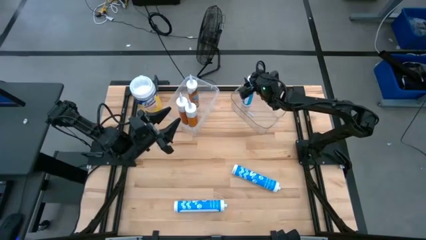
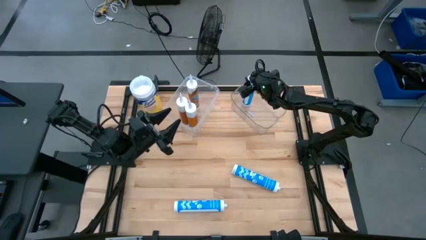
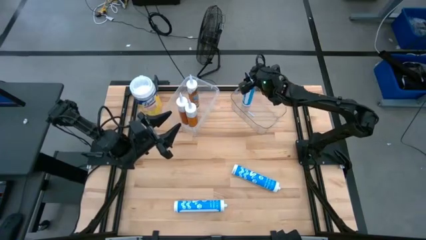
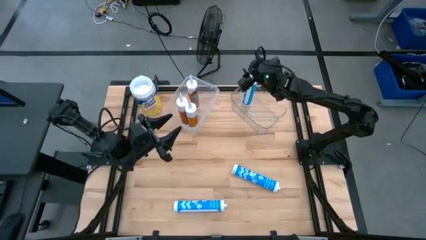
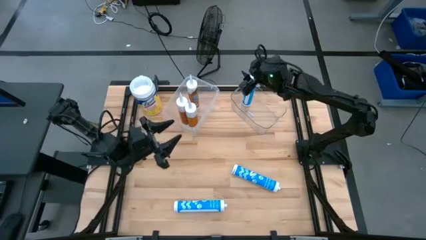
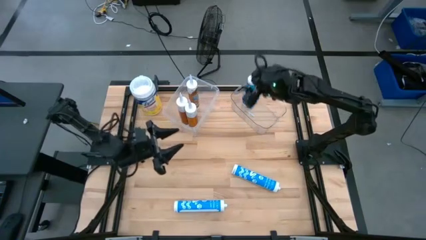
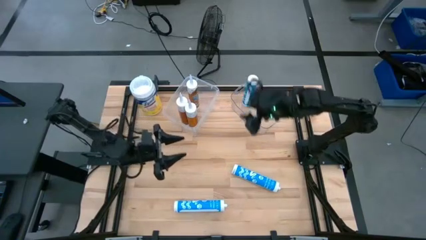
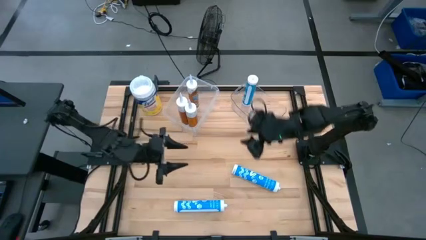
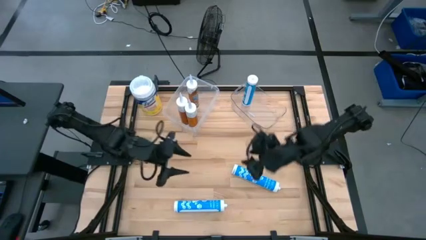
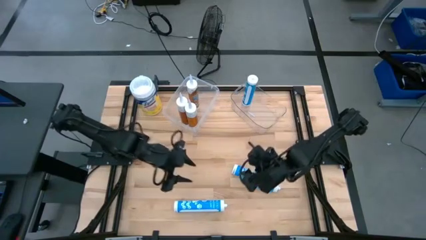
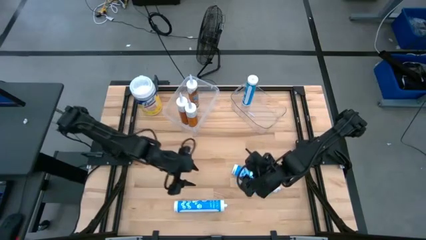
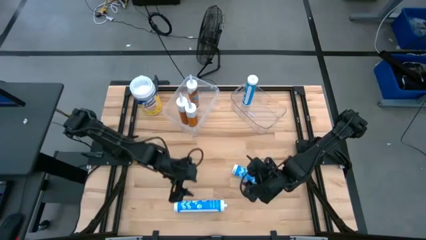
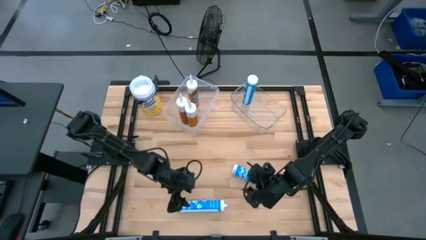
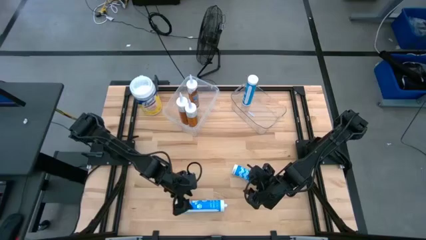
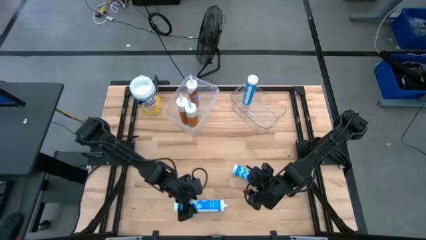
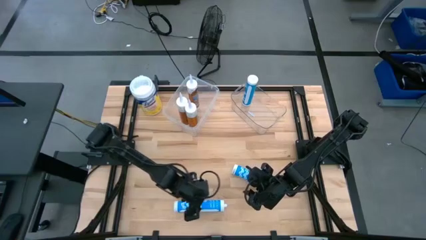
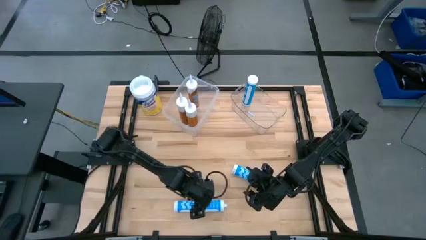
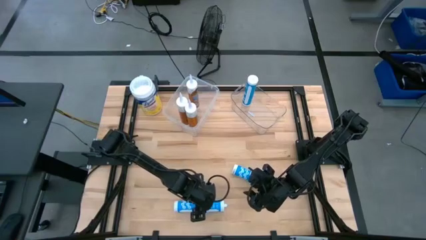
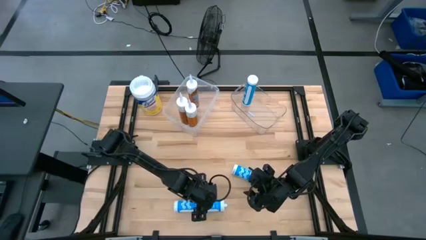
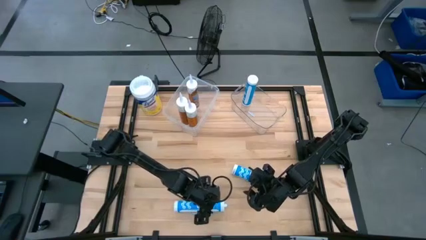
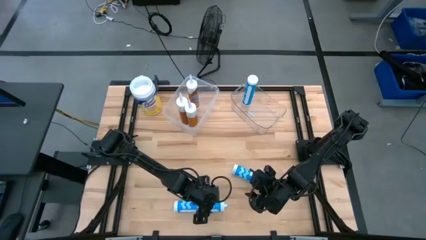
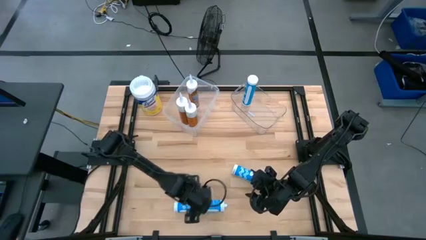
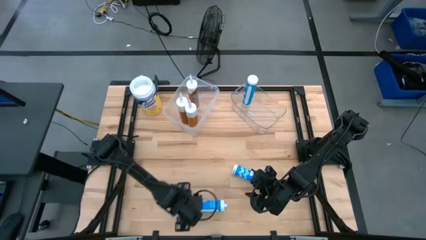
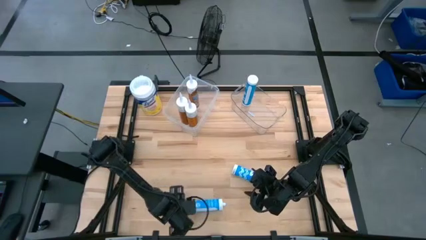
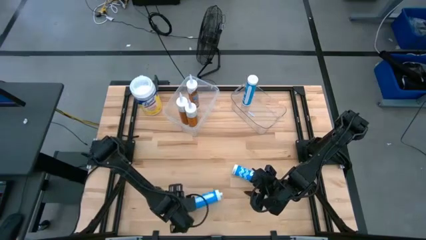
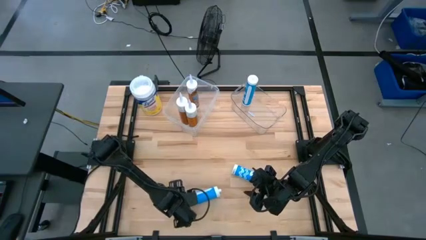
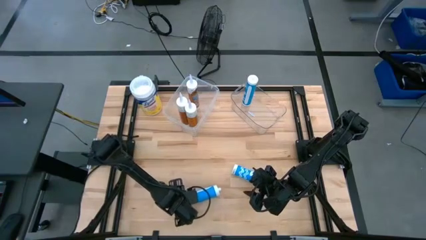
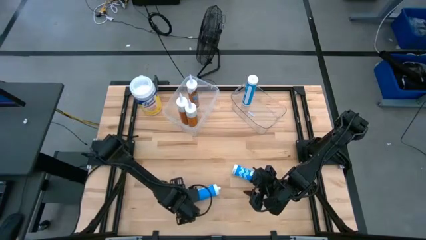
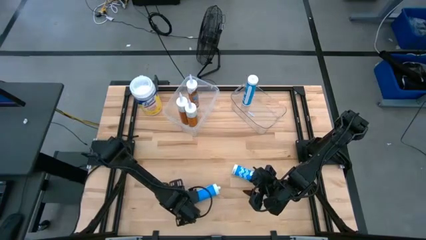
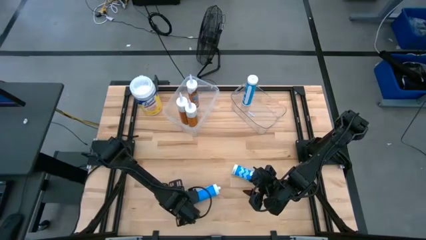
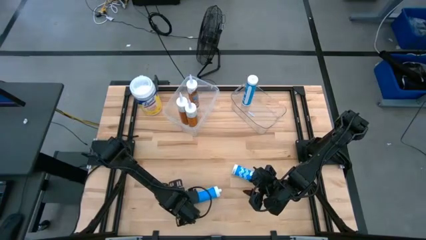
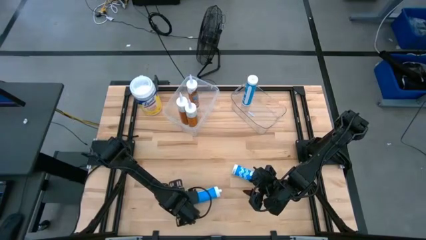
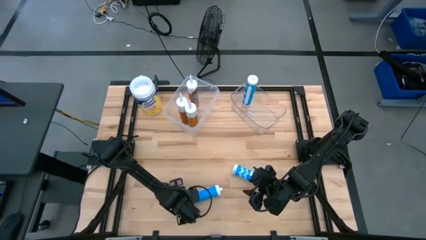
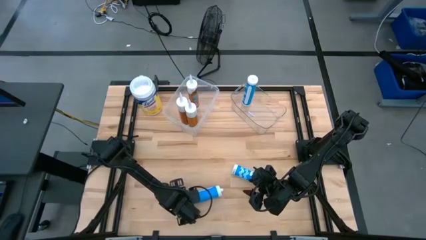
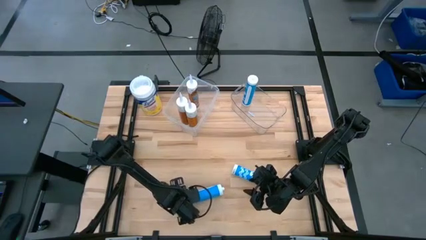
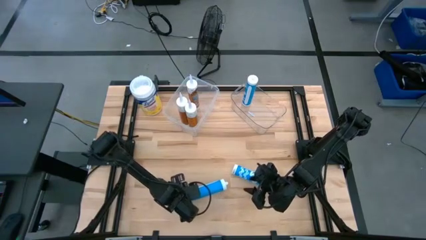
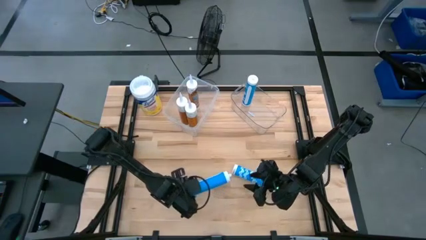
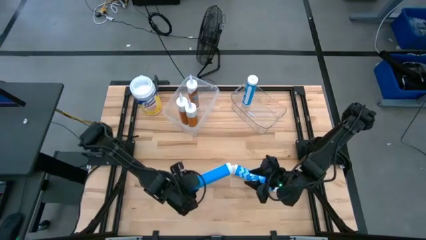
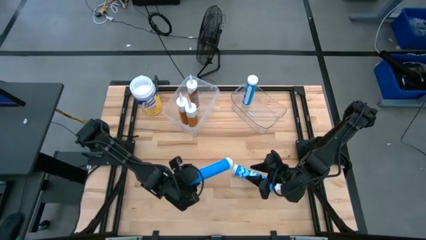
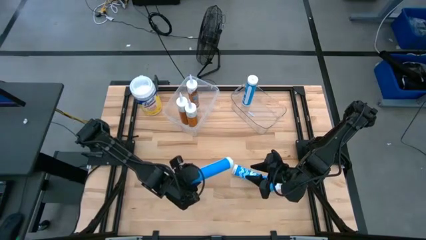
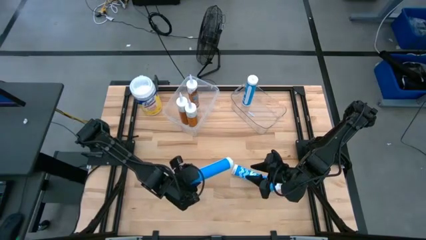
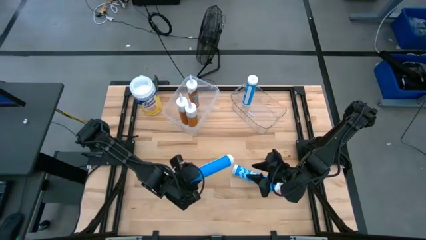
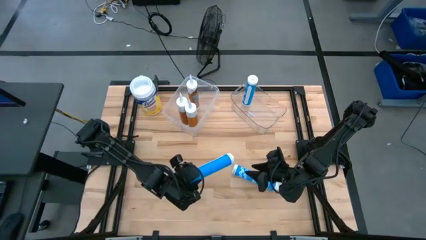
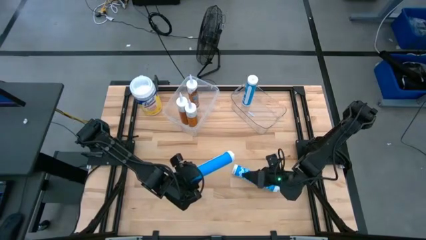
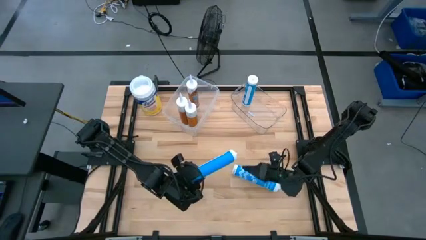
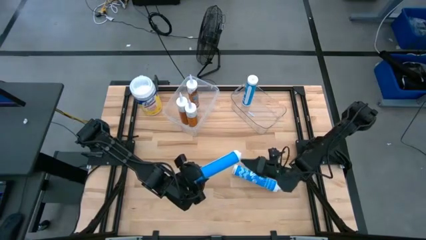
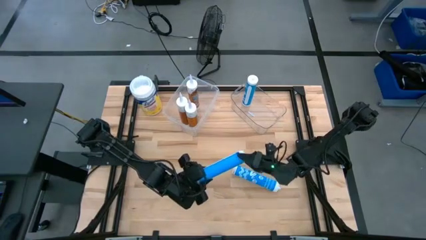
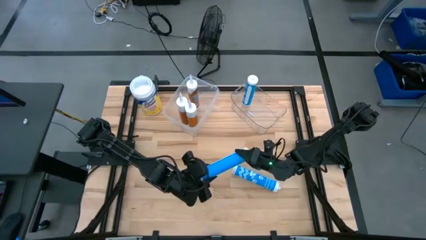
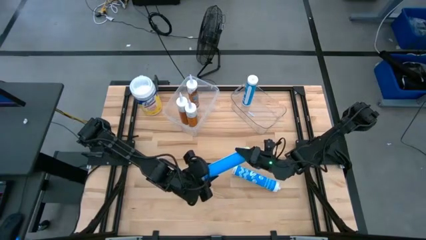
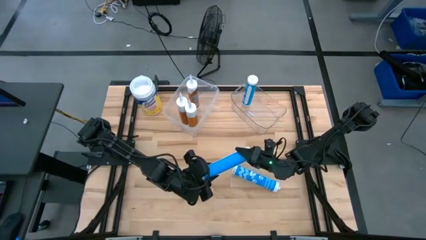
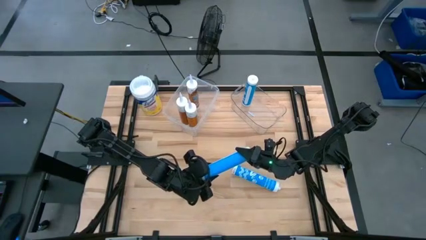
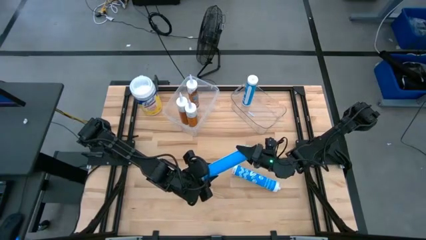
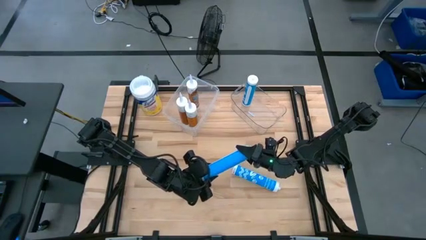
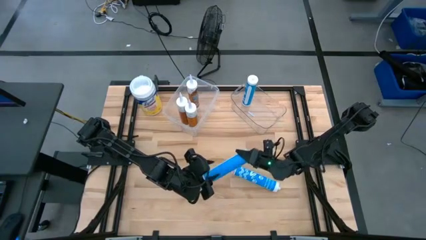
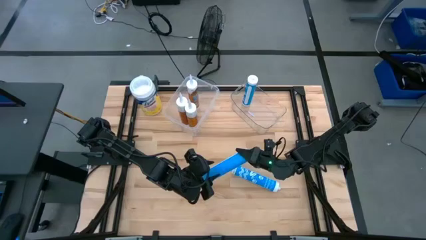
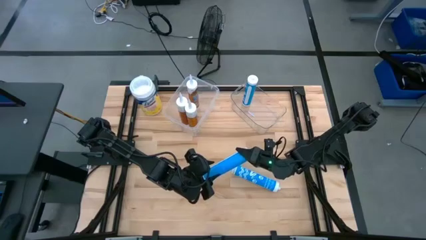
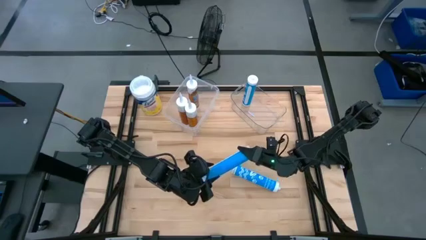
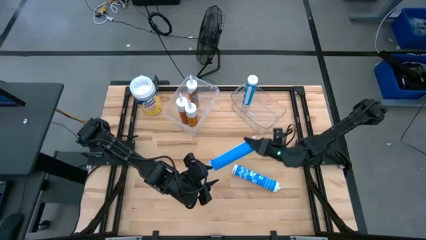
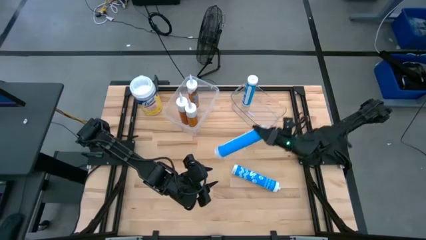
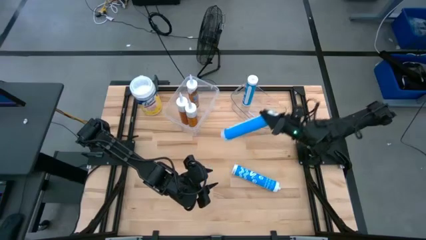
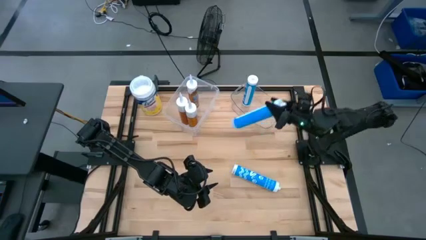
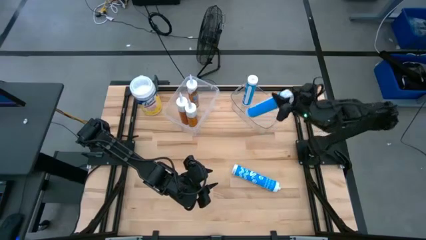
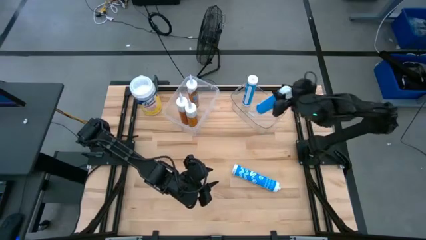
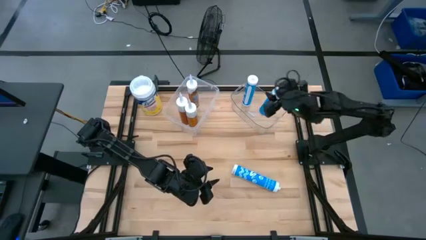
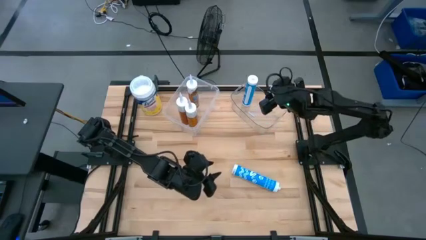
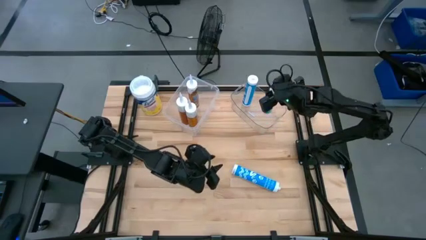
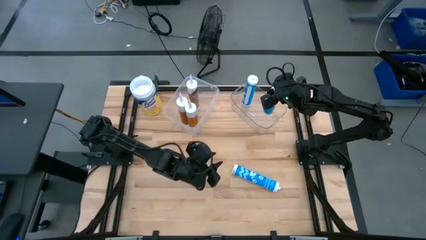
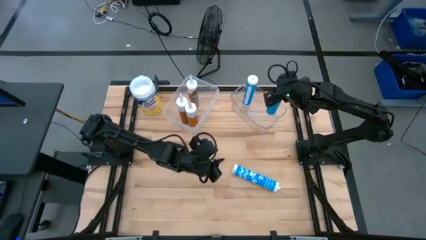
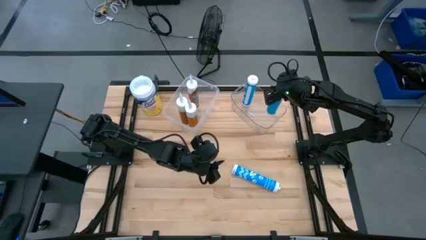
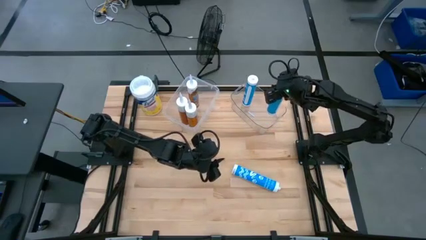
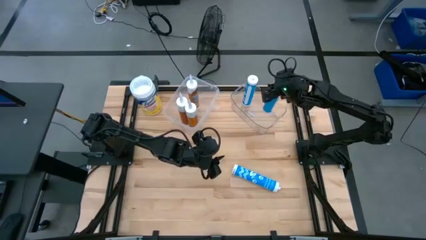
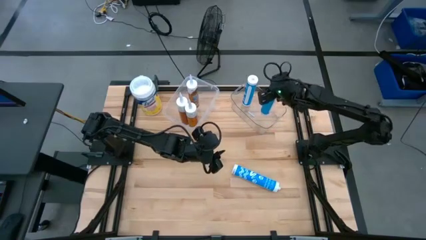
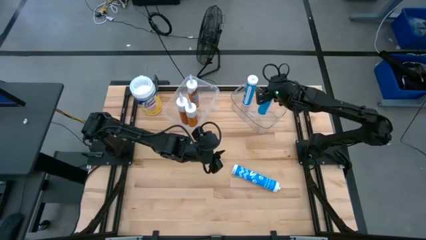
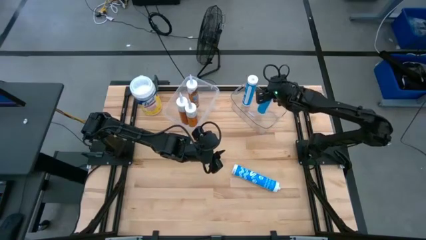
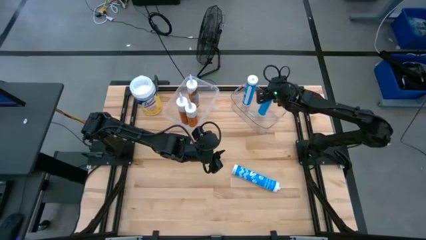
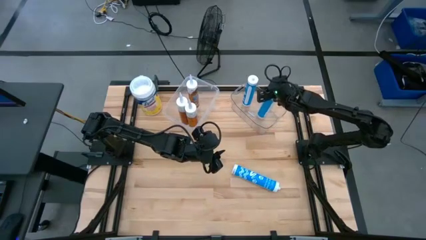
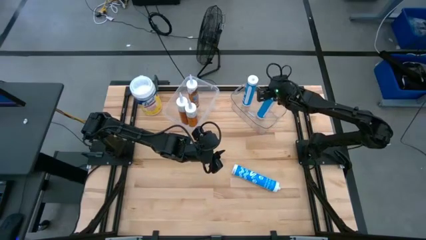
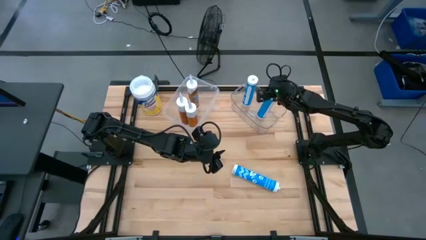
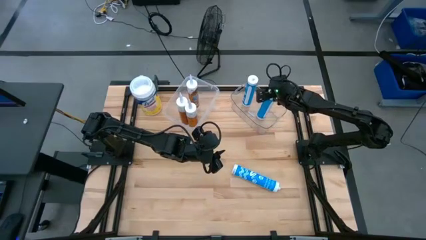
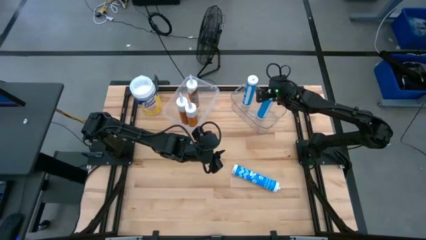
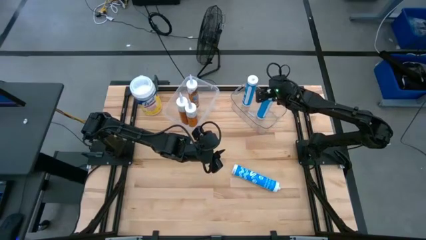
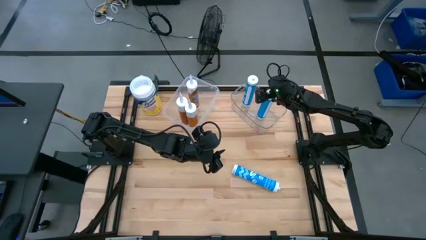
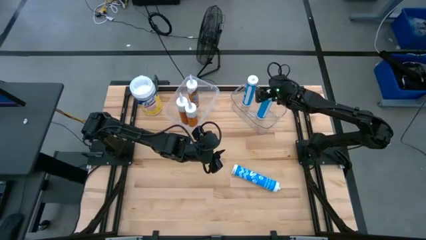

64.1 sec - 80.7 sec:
Task: Pick & place silicon tubes, Sealant and Lysol wipes
Put the bottom blue sealant into the transparent bin
